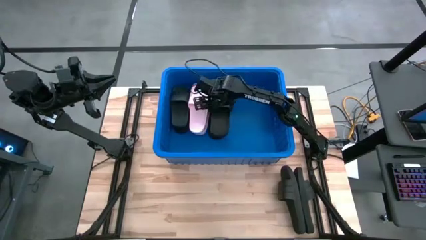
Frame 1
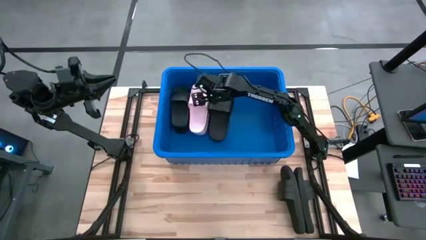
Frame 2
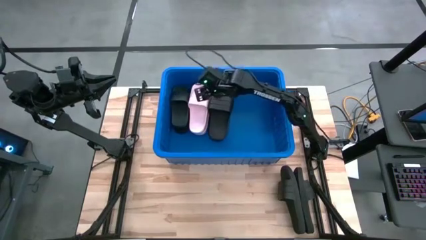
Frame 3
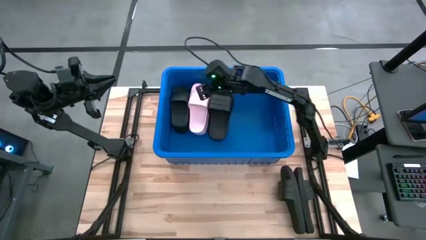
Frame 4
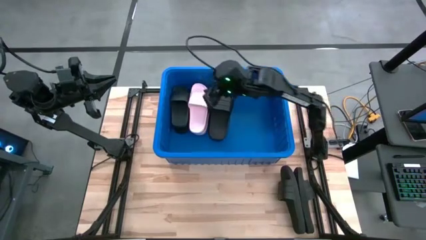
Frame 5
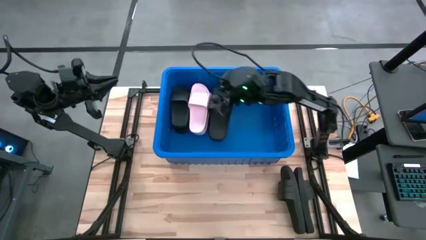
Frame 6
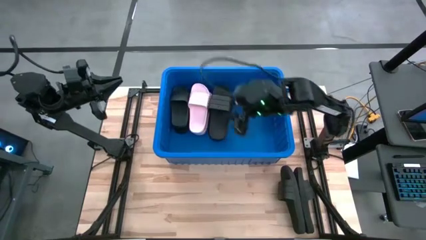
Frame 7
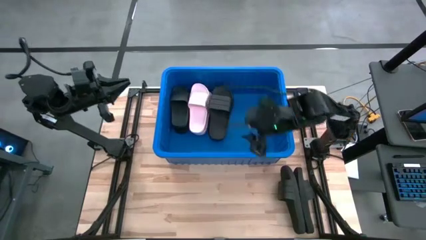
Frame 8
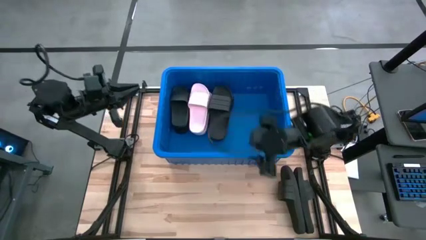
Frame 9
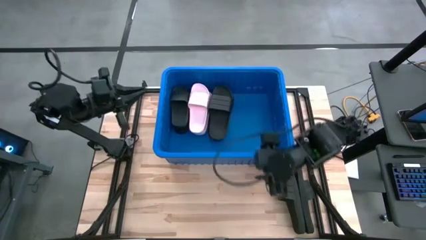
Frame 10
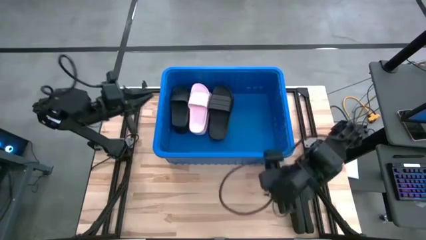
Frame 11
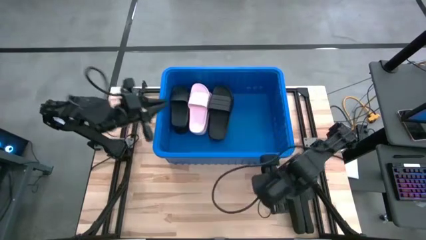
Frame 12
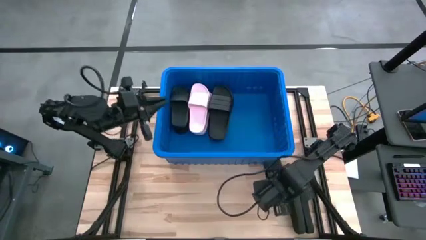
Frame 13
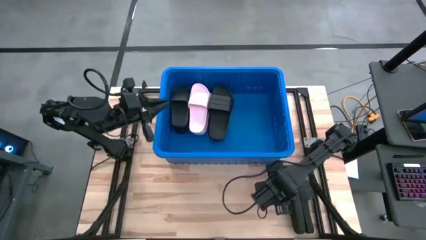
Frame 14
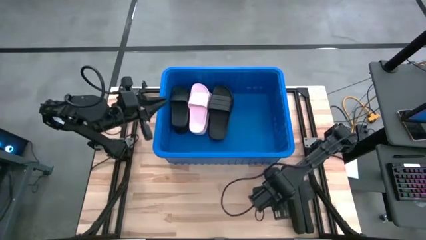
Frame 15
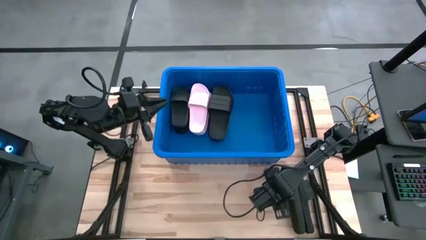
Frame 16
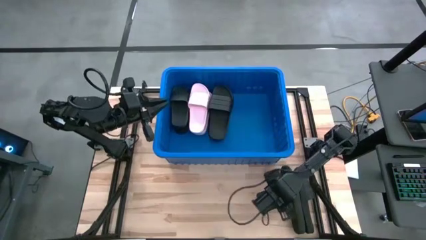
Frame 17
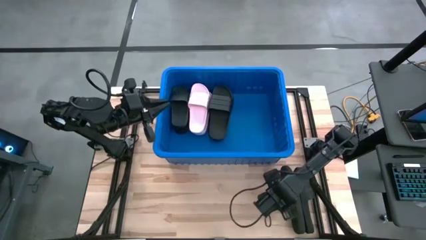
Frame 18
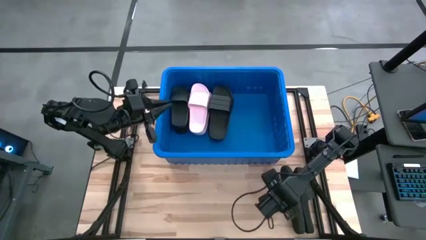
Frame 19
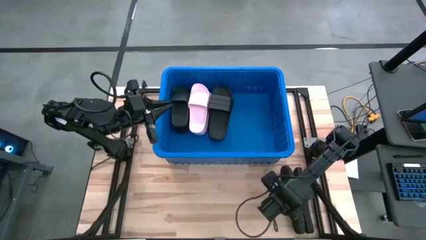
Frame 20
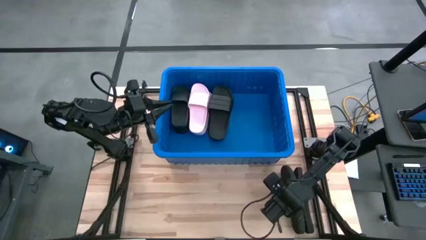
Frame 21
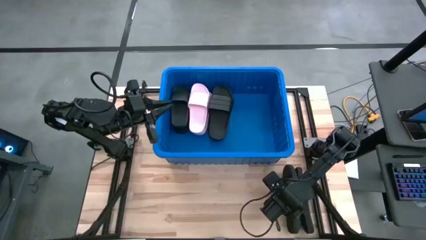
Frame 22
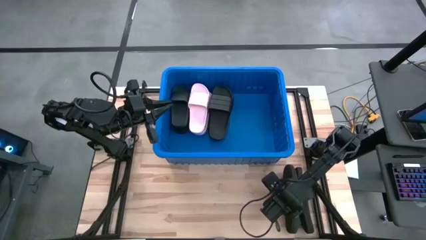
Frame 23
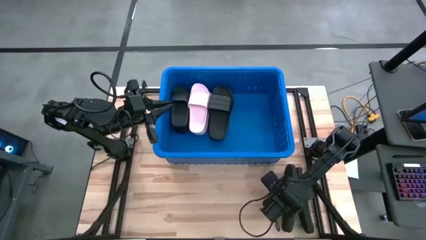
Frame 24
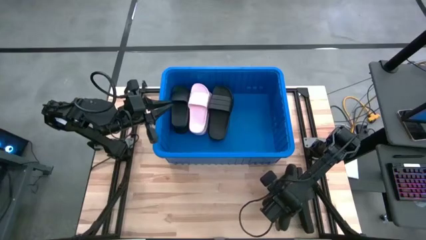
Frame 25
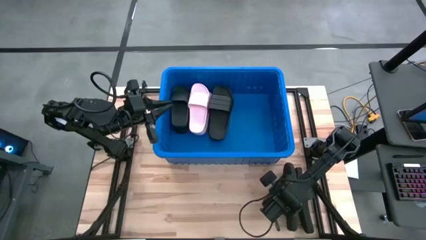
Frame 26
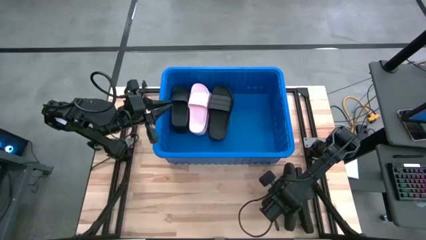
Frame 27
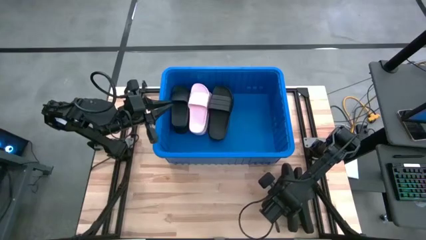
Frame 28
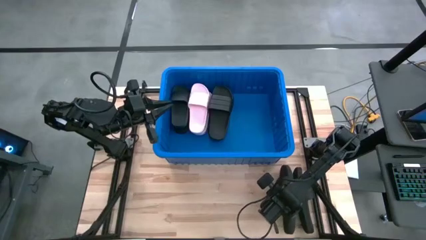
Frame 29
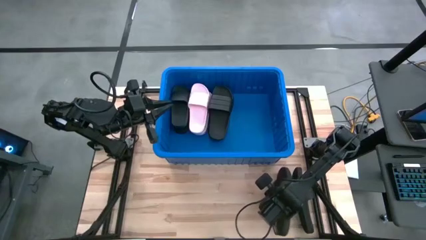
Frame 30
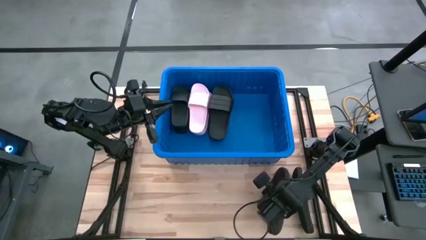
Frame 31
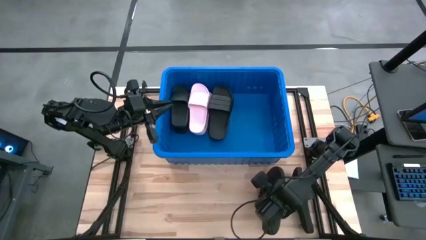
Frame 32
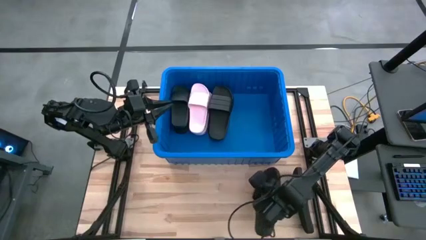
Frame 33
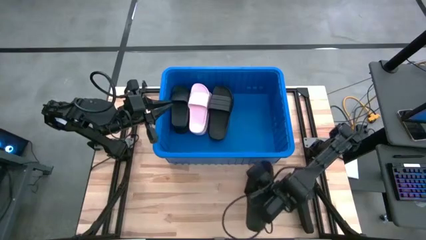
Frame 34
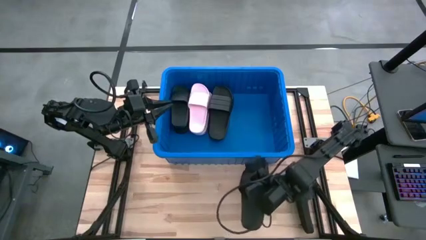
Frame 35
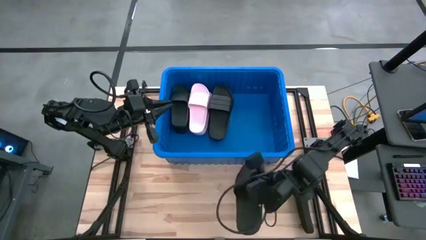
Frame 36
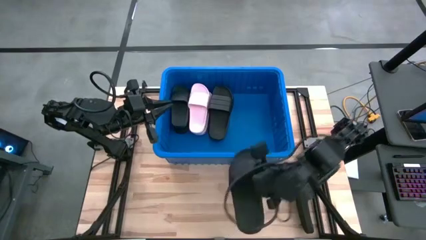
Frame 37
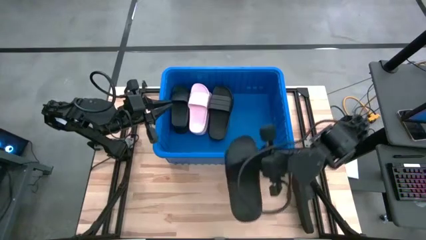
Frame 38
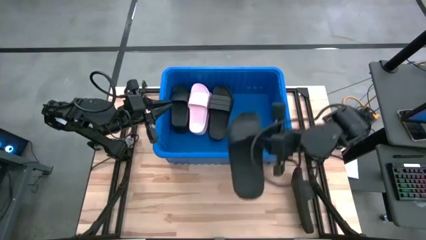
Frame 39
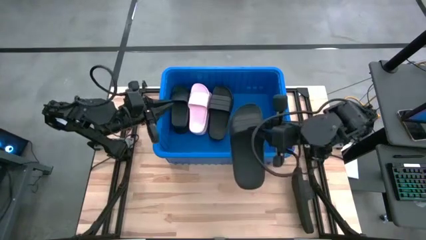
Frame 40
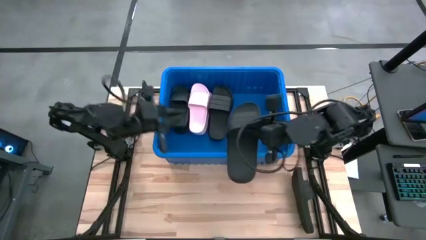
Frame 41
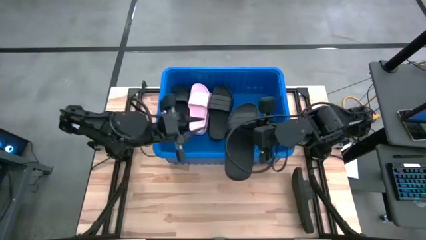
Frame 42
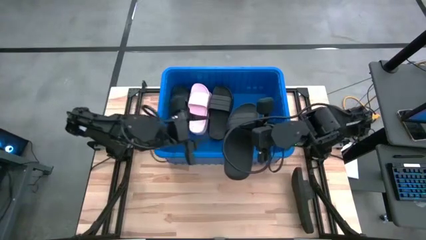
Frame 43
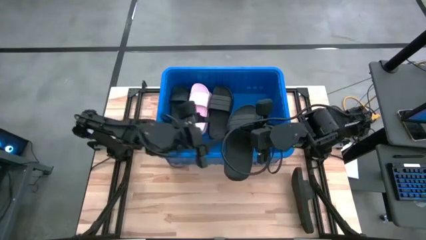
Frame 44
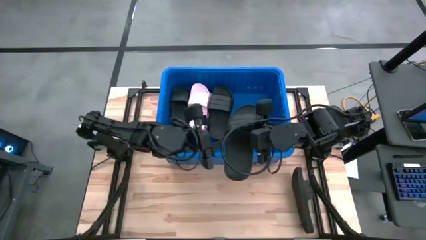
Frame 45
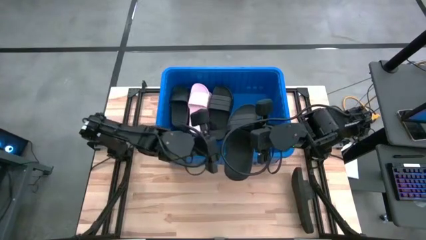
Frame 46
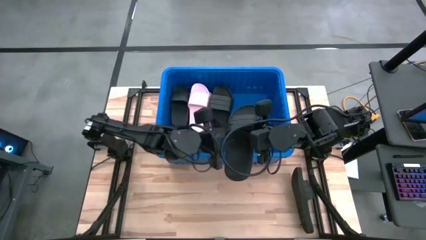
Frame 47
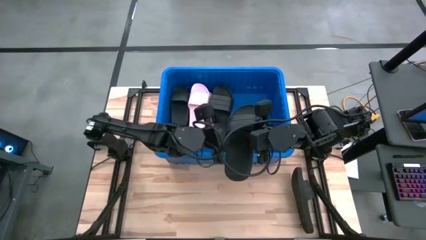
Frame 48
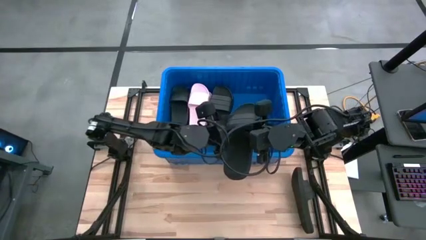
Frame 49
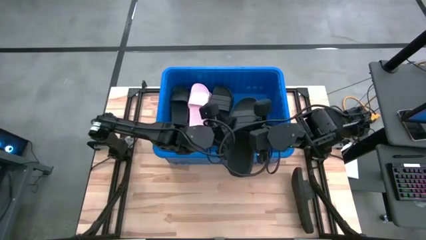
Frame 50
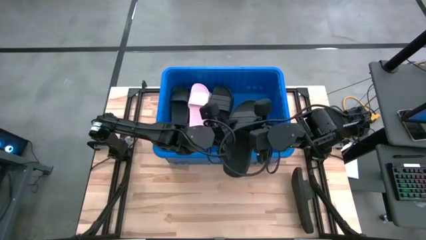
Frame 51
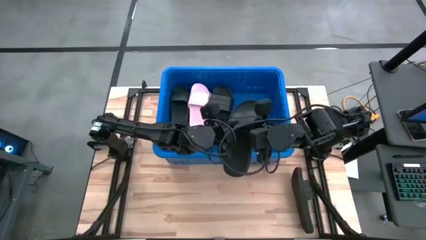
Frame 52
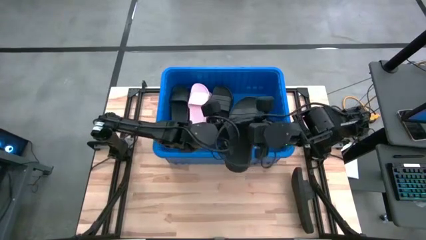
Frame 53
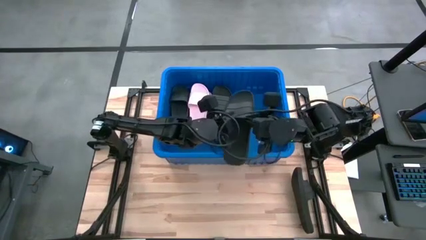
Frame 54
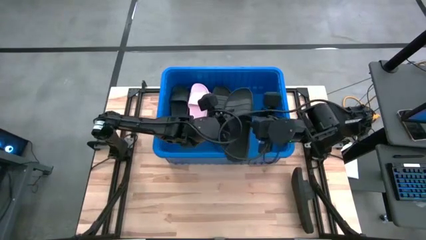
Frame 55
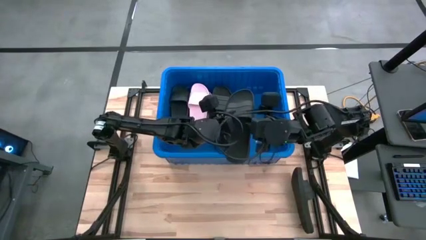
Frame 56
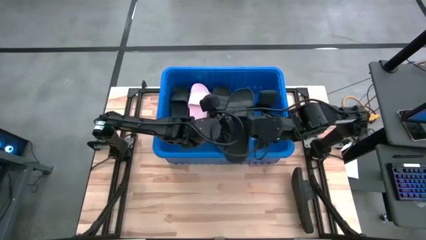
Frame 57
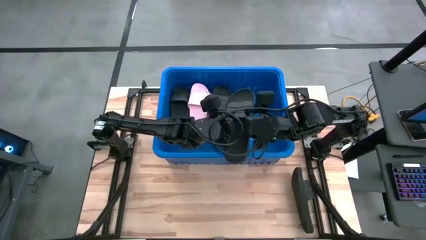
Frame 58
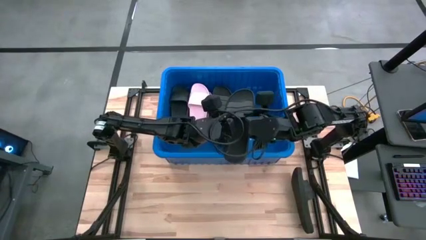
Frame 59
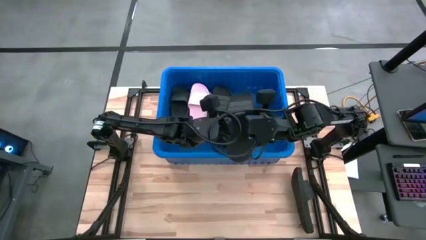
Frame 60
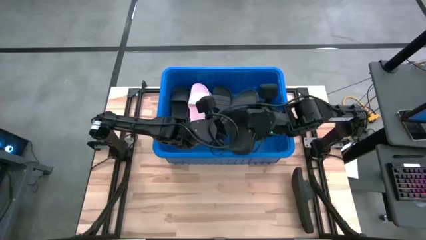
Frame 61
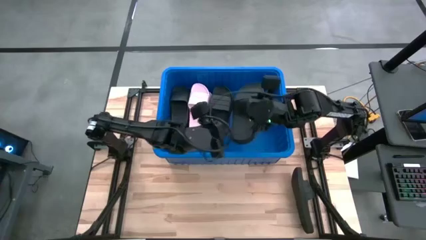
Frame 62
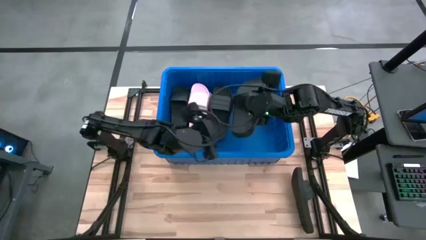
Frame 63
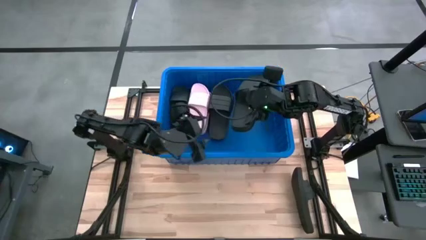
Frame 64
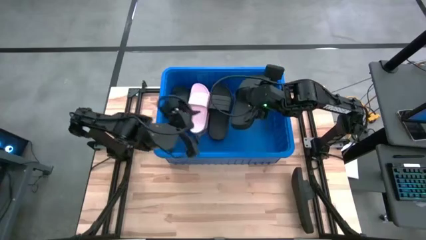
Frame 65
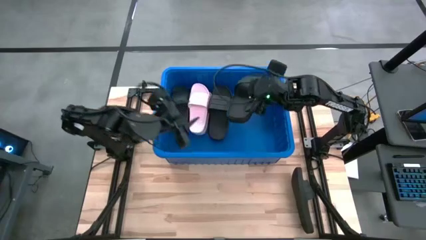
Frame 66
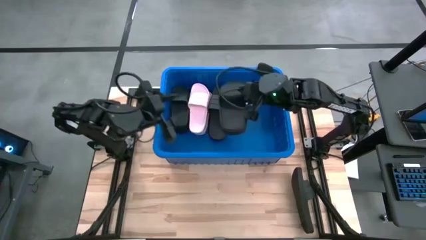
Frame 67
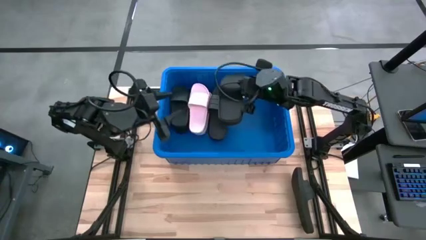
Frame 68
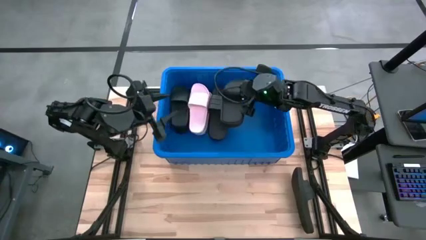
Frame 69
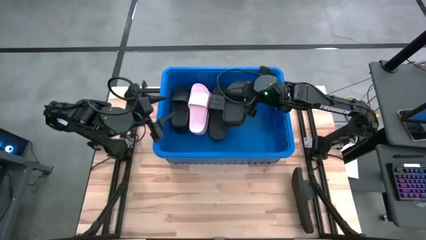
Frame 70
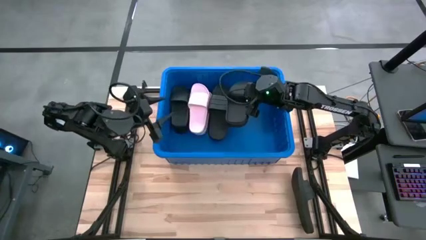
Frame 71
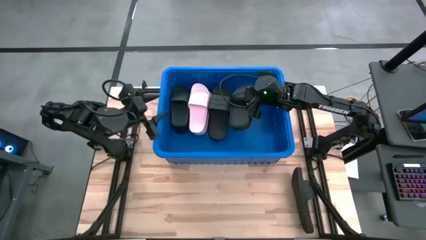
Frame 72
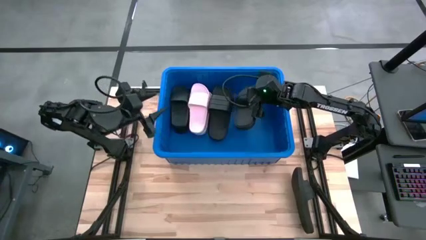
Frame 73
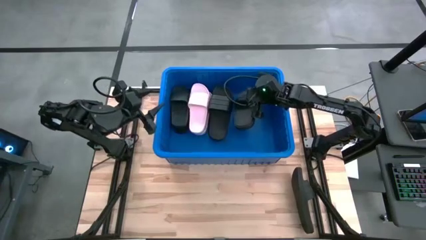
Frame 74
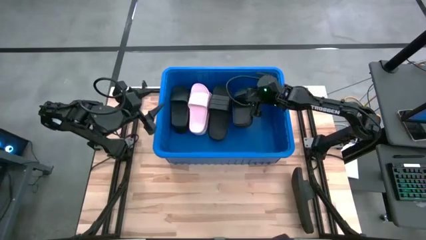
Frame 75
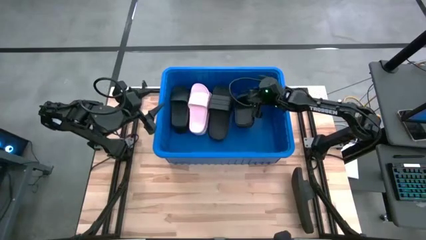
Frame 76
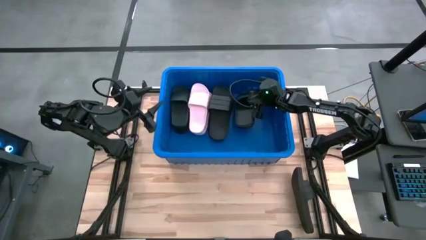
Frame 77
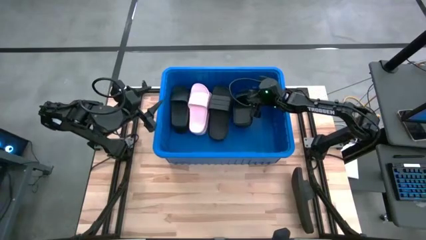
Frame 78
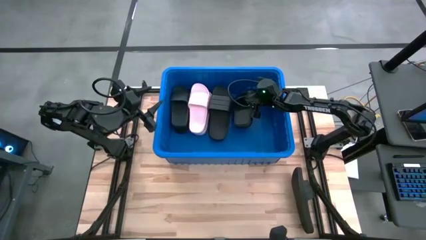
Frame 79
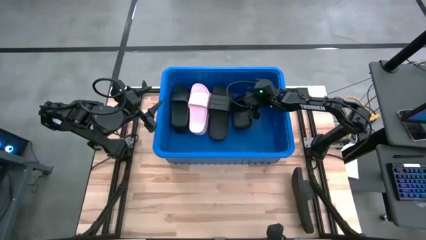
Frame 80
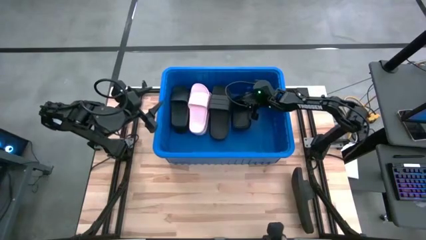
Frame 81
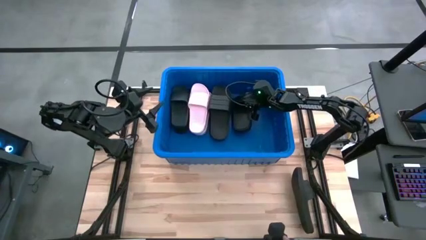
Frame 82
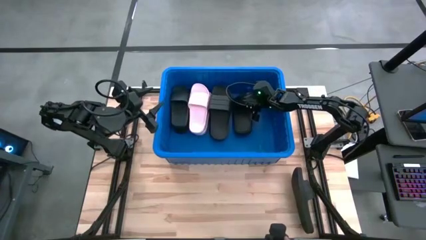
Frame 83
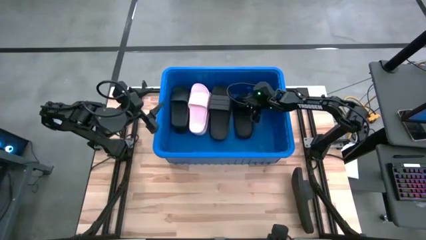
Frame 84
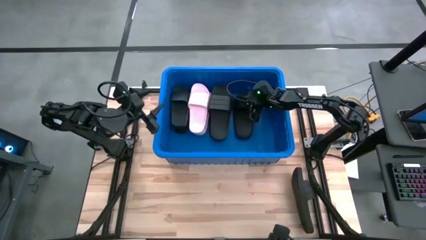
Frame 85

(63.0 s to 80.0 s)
Task: Pick and place slides into bin
Put the black slipper into the blue container
